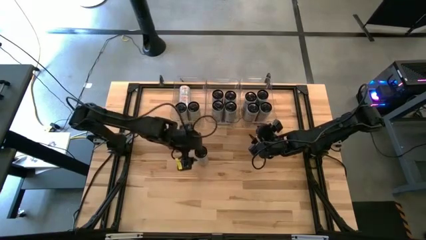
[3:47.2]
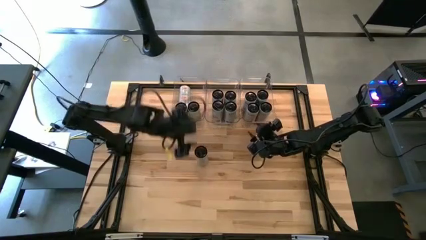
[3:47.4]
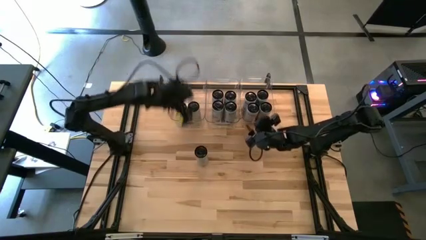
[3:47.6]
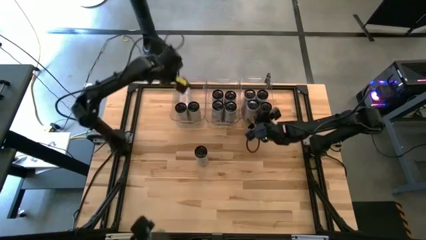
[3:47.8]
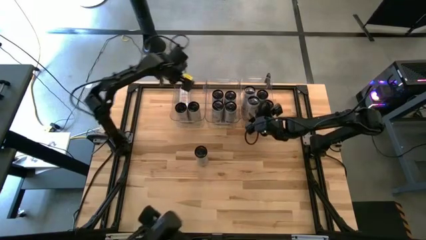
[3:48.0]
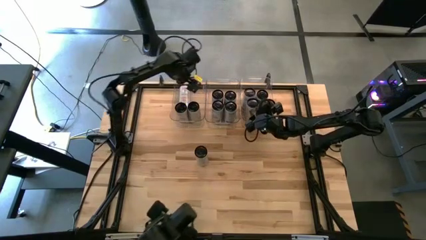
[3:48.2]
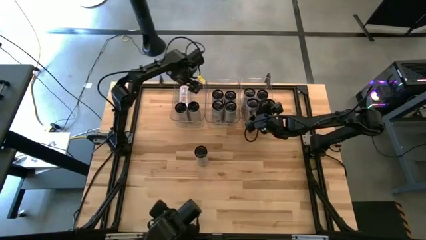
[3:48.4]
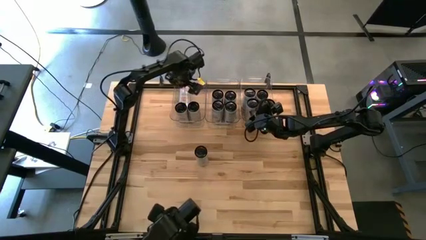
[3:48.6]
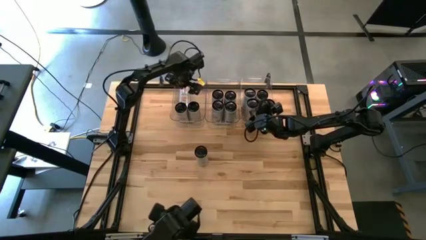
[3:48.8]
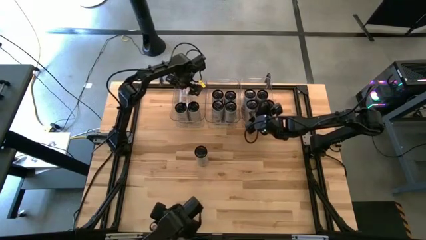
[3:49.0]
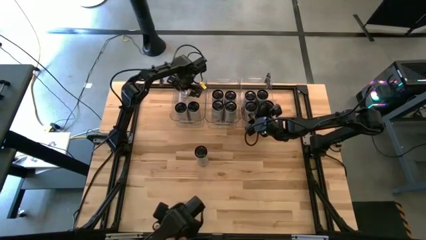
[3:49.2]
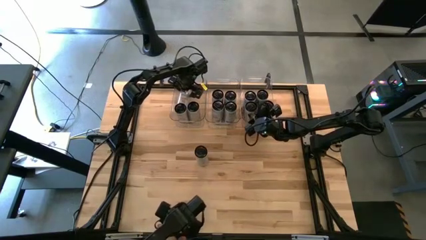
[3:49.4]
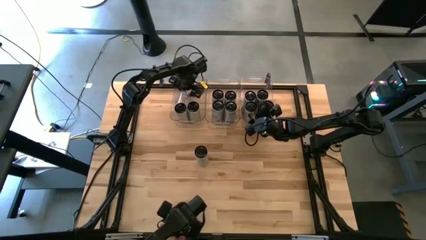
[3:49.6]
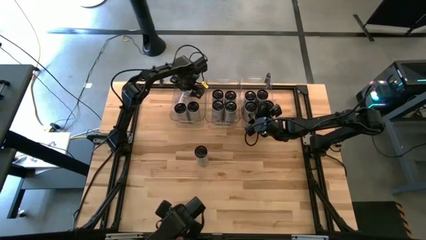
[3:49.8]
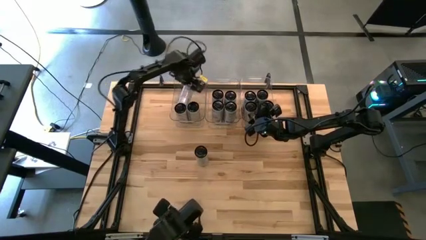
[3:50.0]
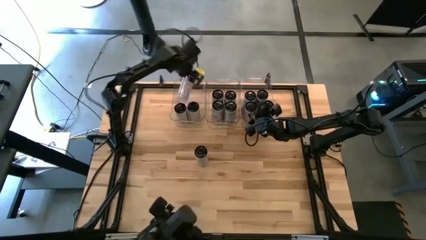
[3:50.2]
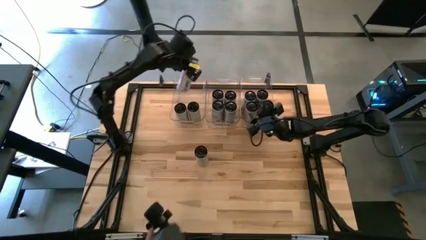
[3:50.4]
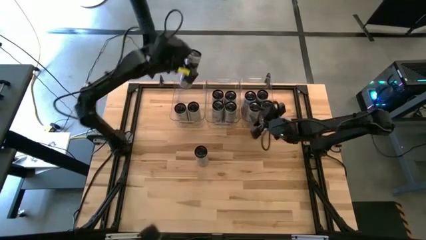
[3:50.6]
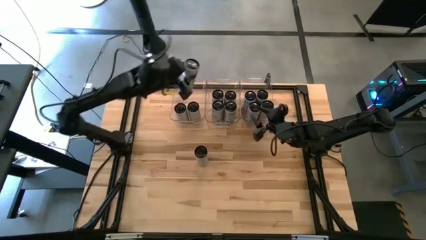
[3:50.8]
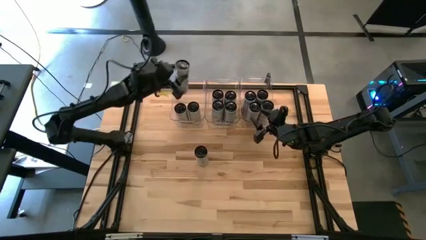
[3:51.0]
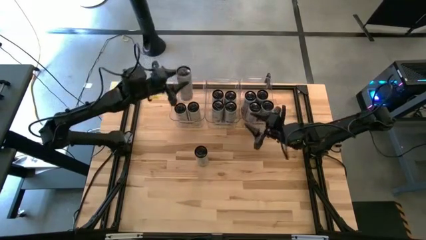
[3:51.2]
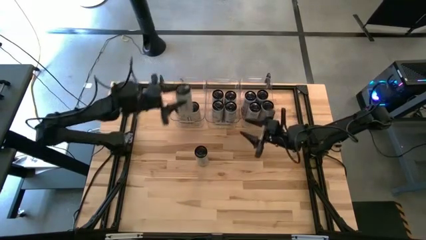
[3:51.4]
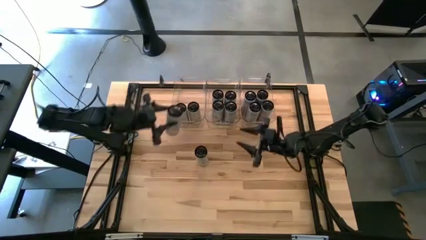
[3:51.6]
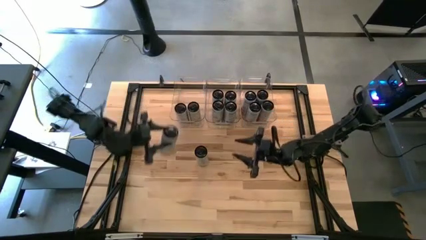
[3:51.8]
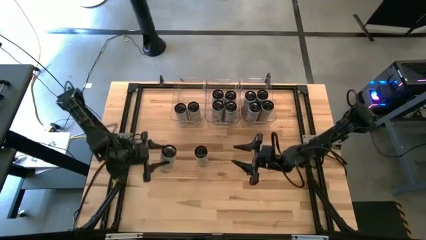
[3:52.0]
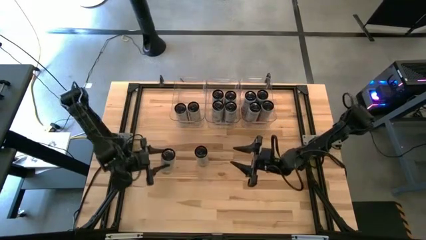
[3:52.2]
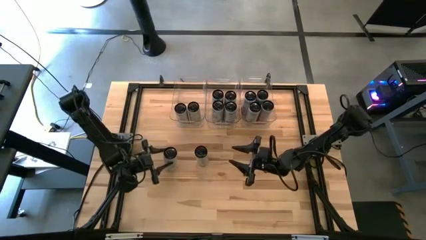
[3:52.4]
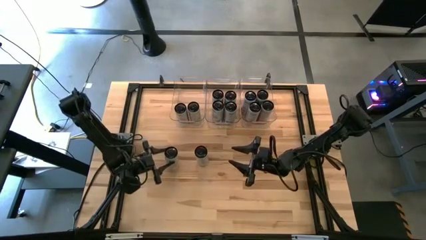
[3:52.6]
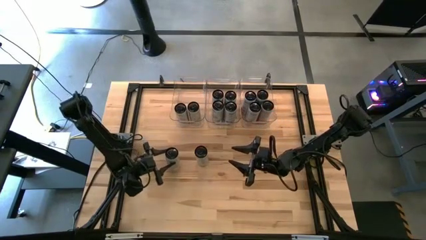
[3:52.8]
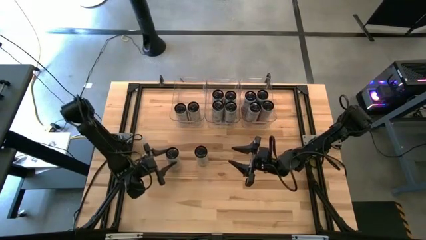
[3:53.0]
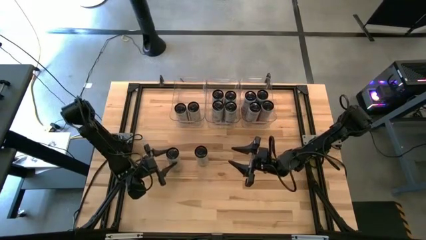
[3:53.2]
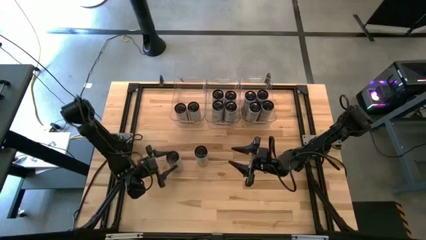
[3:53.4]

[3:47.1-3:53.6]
Task: Sort soda cans
Remove the white-yellow soda can from the top left transparent bin

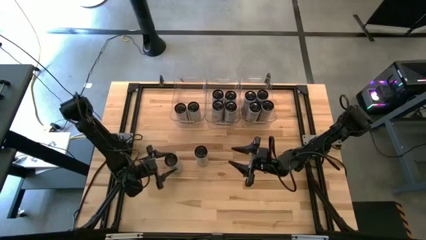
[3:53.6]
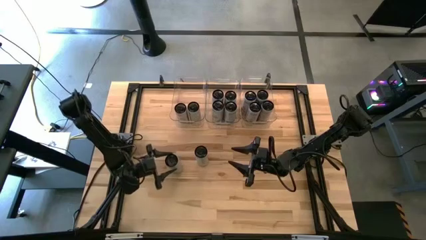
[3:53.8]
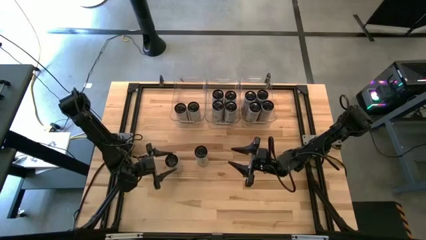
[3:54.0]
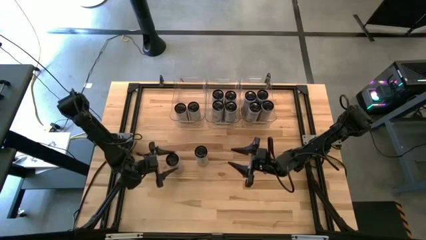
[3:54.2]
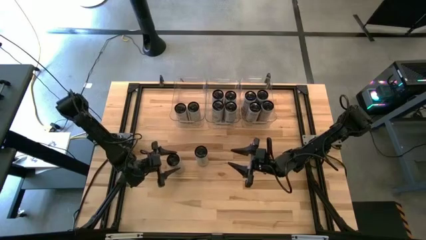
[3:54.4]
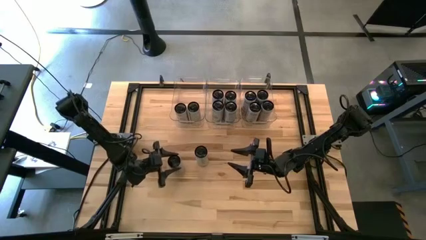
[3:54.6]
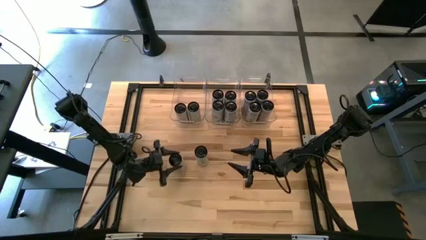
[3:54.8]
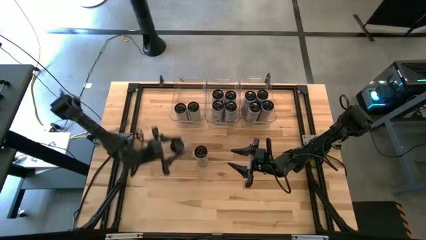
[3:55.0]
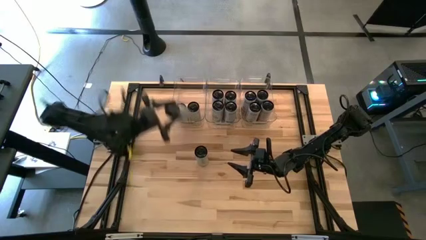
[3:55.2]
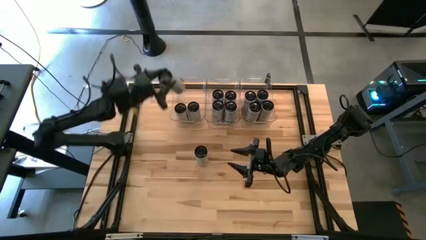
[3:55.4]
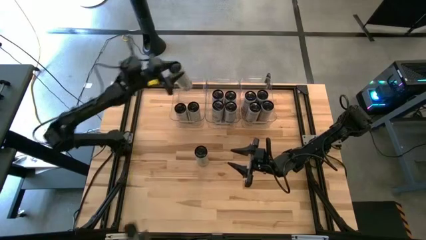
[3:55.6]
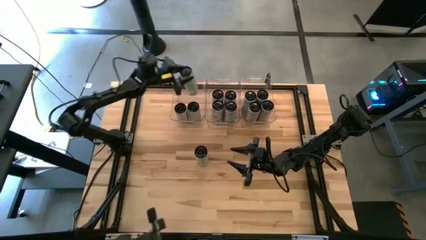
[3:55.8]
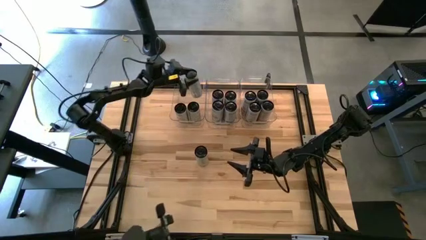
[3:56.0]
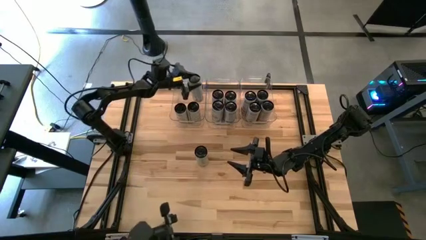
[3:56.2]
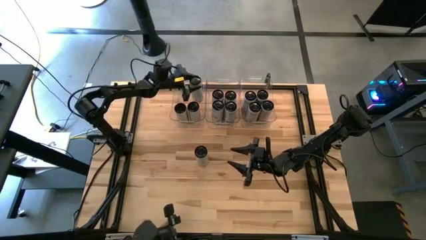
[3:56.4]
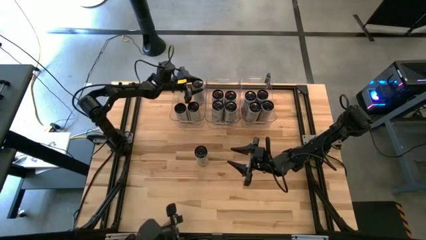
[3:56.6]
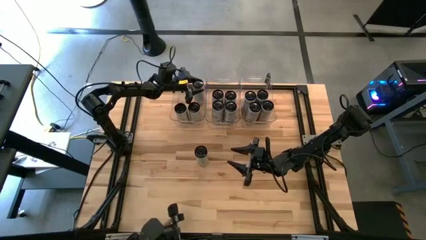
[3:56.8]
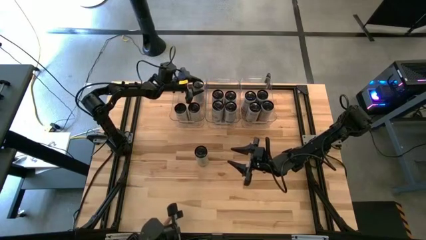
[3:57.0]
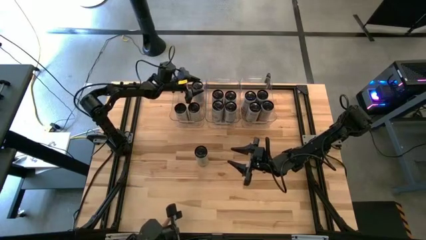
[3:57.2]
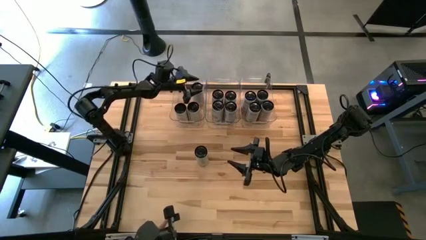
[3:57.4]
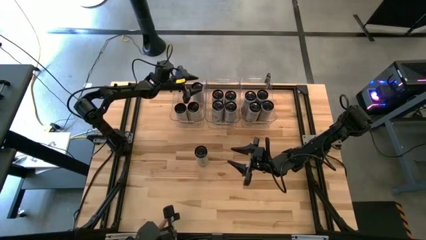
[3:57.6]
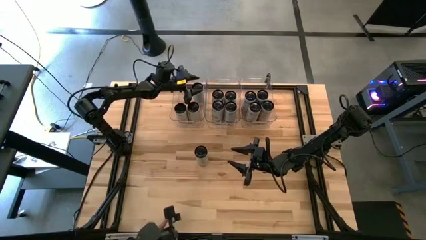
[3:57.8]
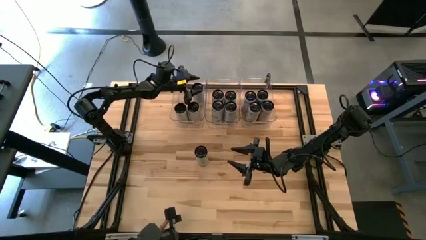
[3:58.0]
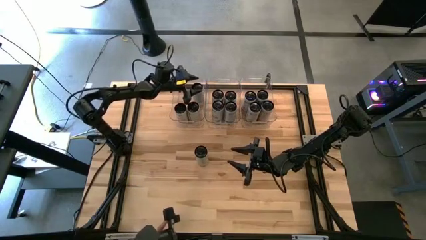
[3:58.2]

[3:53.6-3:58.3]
Put the white-yellow soda can into the top left transparent bin

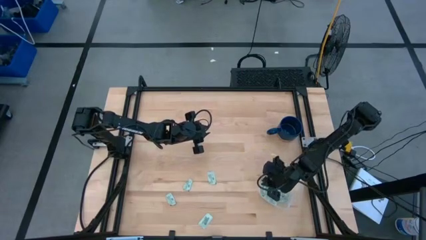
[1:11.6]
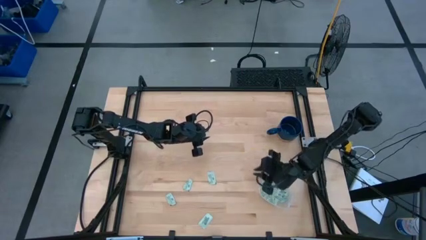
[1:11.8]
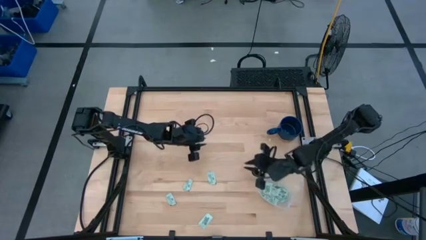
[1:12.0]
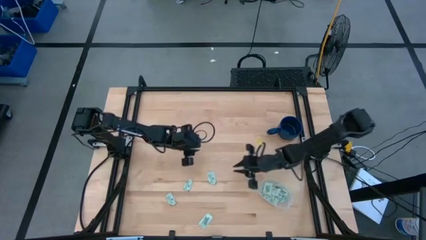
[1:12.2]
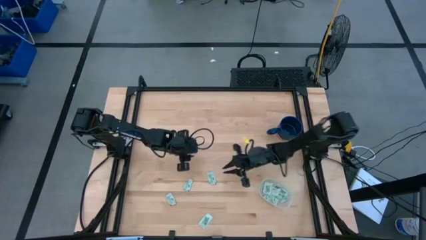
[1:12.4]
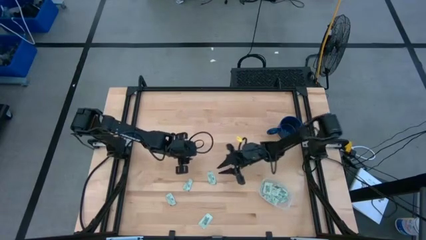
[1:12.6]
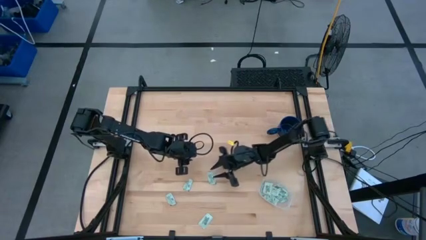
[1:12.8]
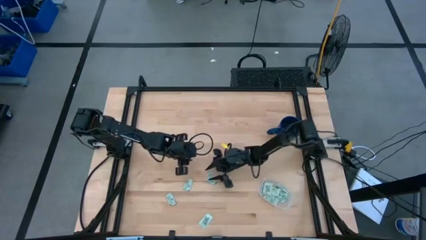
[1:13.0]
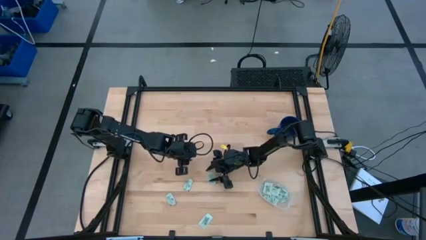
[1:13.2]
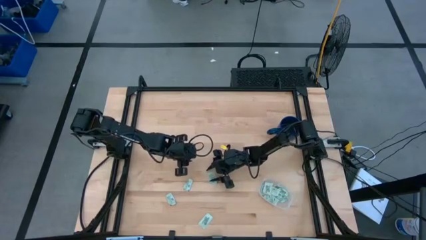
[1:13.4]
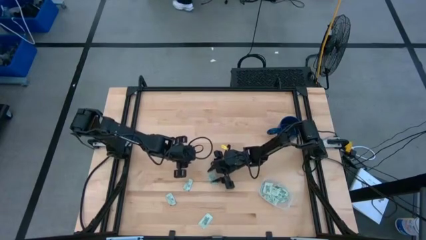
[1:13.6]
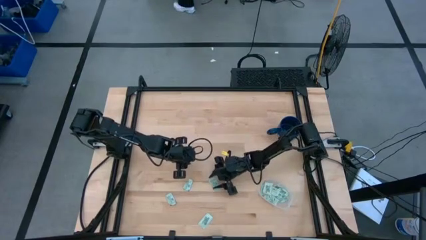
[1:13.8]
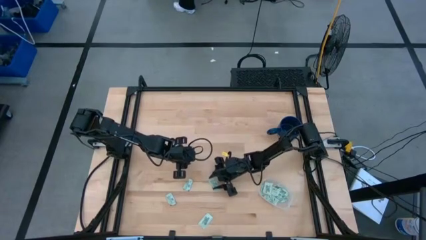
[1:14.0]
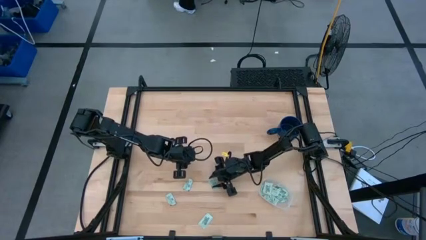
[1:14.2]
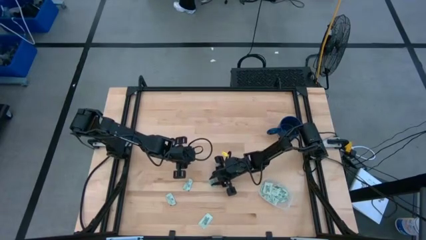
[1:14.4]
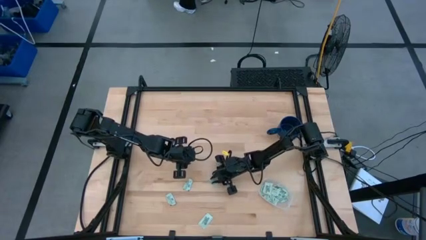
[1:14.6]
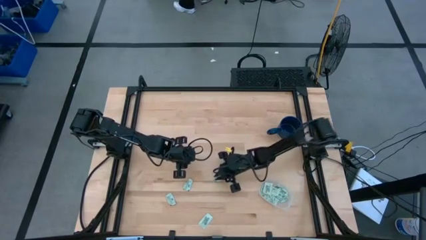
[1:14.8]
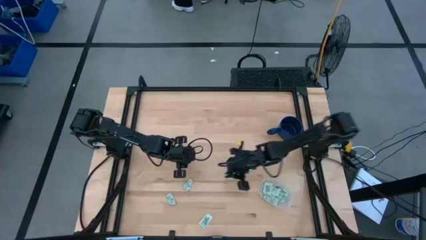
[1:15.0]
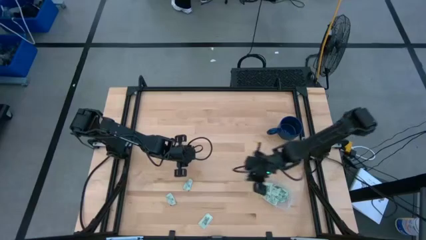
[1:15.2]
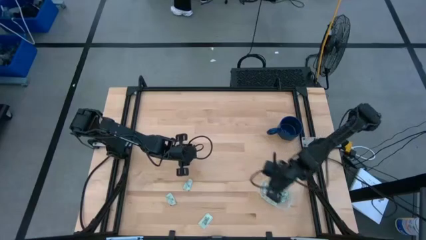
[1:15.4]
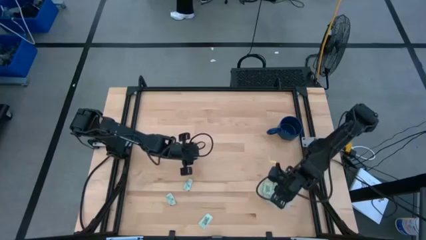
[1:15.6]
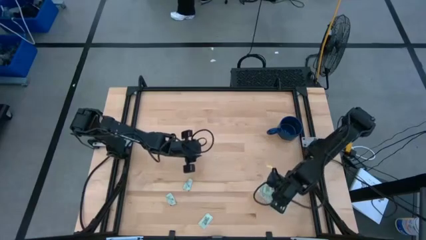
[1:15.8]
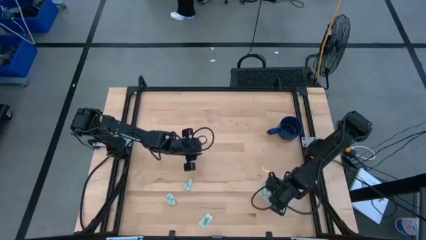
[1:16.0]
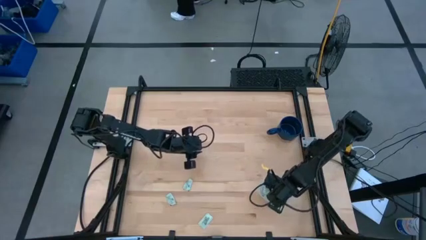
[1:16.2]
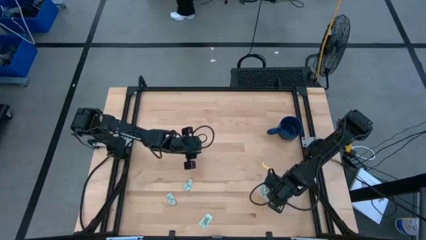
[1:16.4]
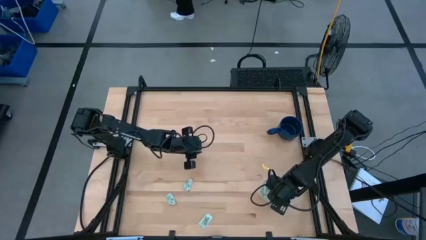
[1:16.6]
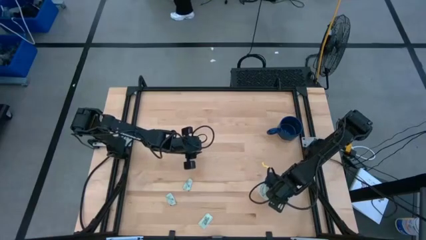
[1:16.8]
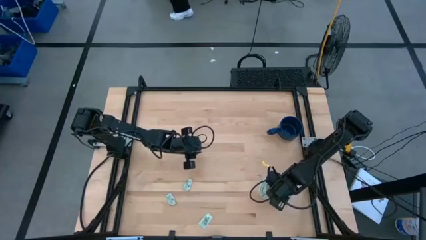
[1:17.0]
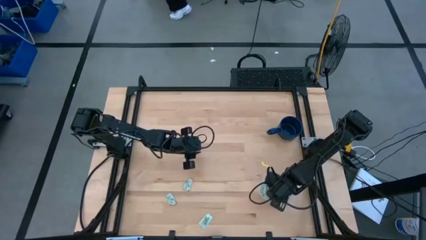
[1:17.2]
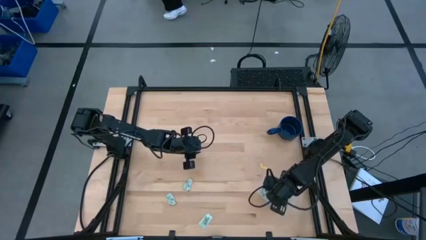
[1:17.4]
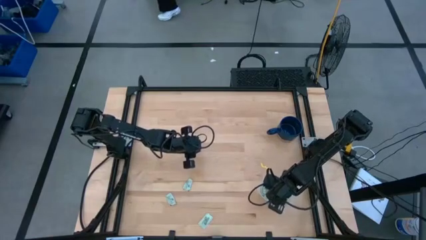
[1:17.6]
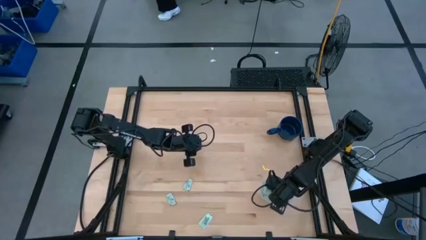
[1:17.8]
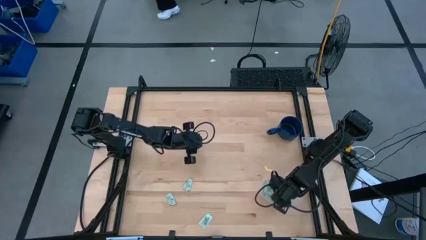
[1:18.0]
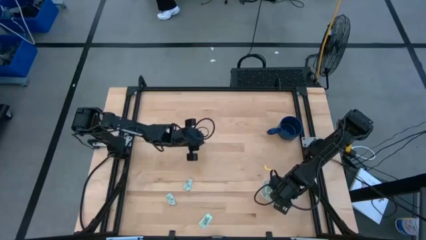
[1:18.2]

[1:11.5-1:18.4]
Task: Pick and place Stevia / Truvia into bins
Put the stevia packet into the transparent container
